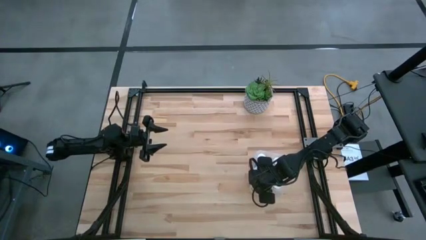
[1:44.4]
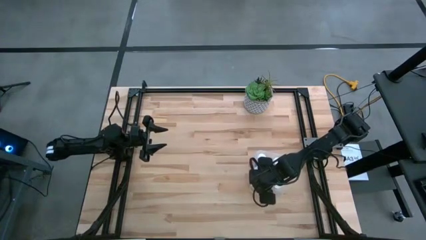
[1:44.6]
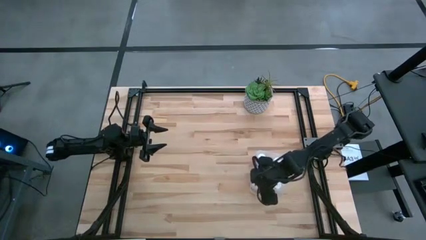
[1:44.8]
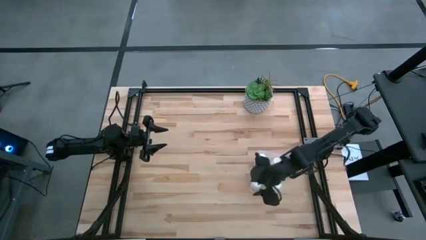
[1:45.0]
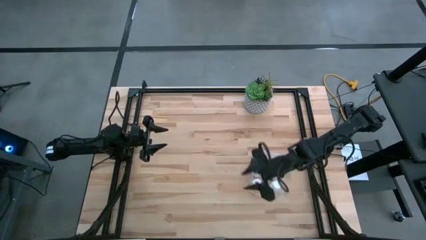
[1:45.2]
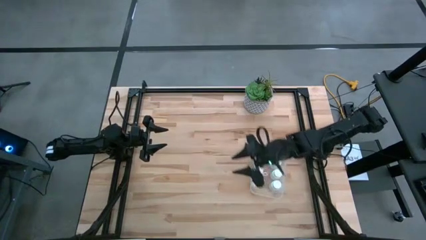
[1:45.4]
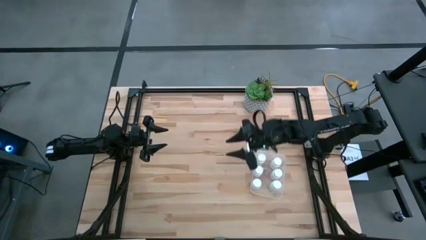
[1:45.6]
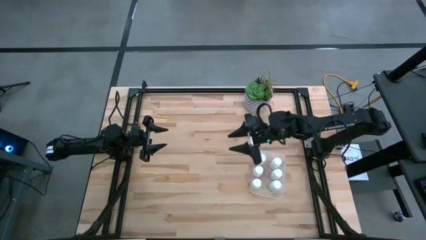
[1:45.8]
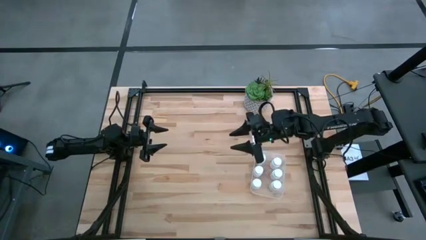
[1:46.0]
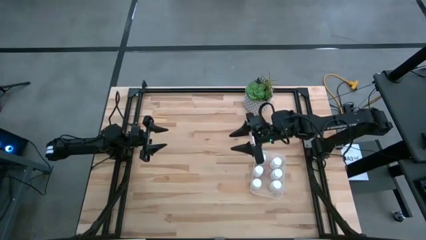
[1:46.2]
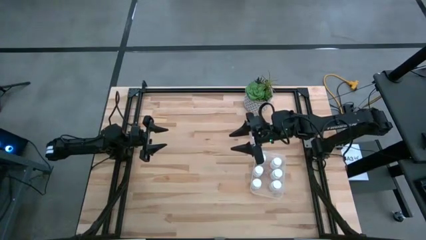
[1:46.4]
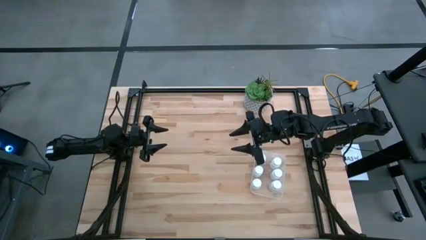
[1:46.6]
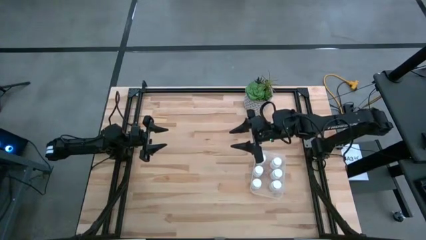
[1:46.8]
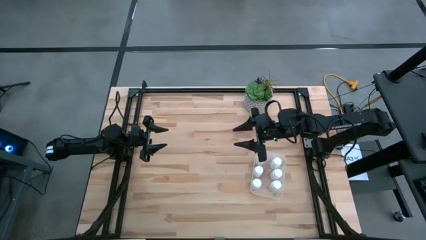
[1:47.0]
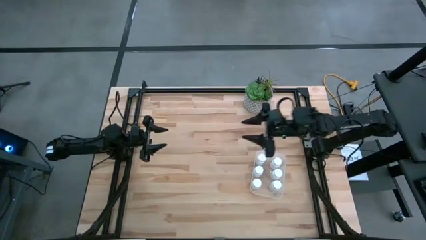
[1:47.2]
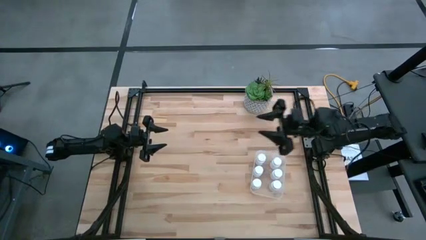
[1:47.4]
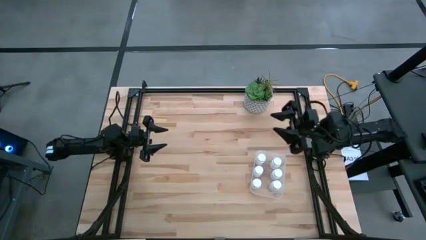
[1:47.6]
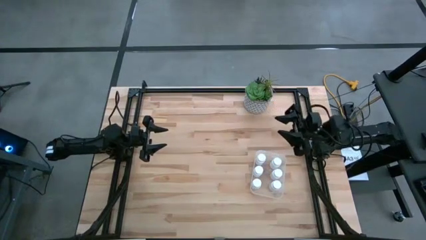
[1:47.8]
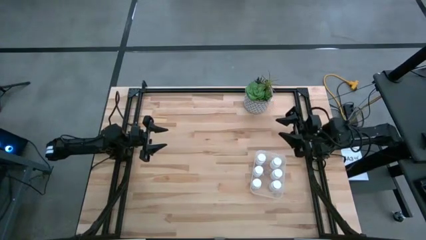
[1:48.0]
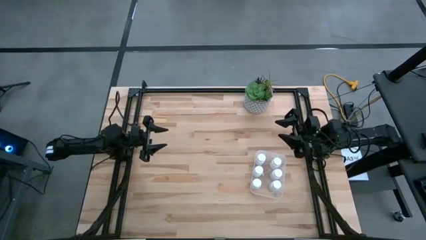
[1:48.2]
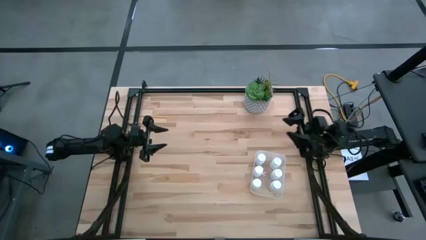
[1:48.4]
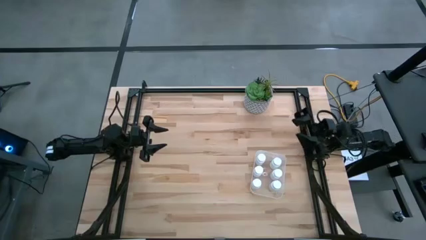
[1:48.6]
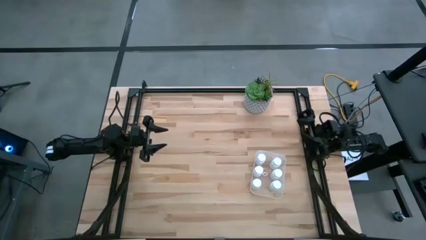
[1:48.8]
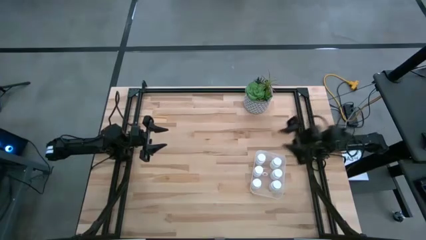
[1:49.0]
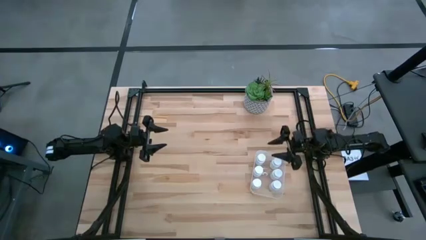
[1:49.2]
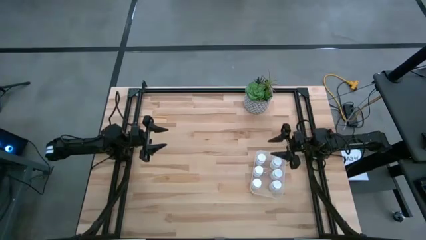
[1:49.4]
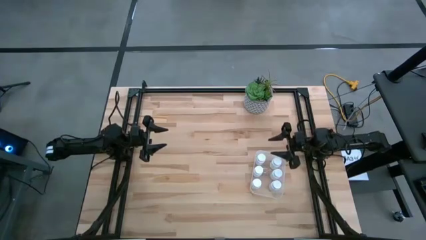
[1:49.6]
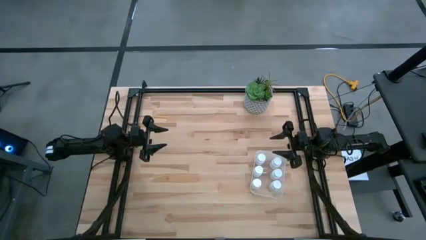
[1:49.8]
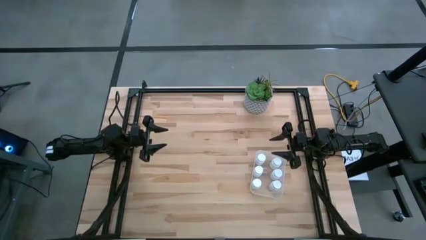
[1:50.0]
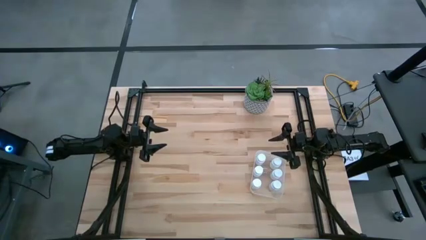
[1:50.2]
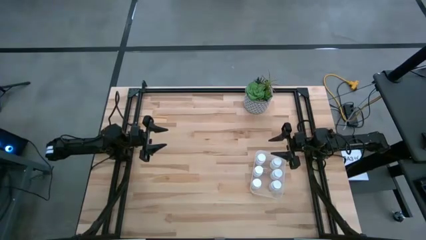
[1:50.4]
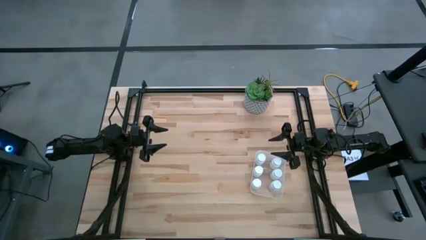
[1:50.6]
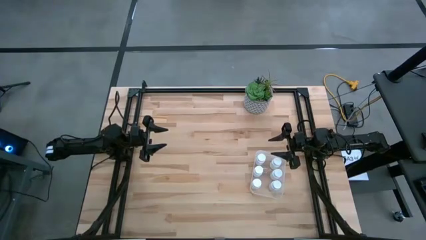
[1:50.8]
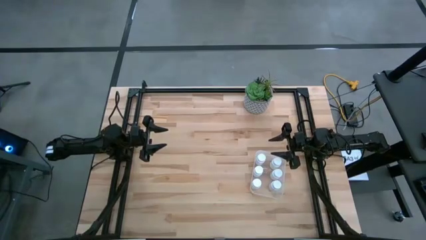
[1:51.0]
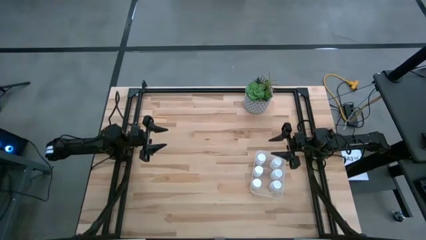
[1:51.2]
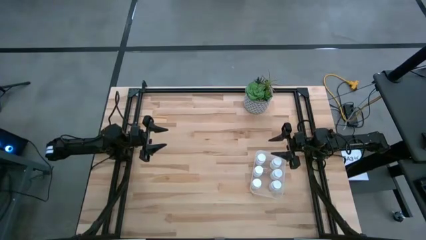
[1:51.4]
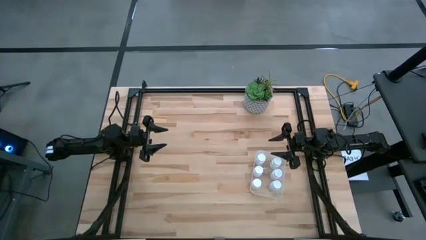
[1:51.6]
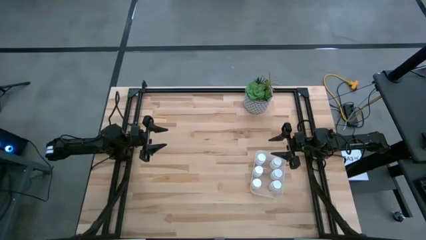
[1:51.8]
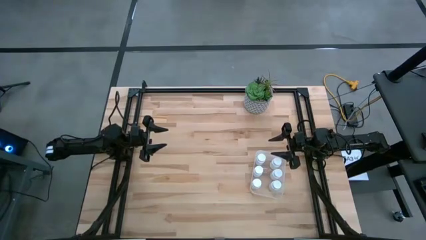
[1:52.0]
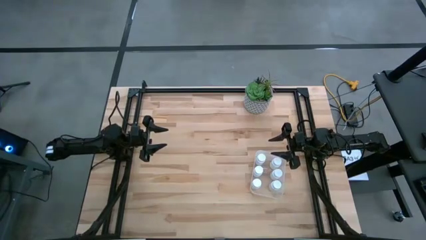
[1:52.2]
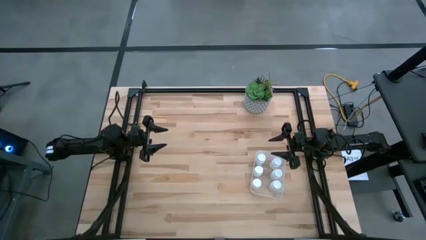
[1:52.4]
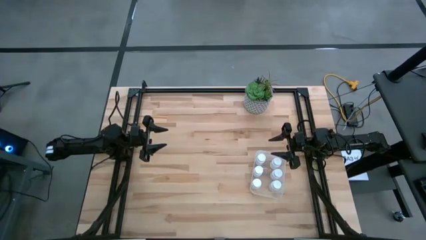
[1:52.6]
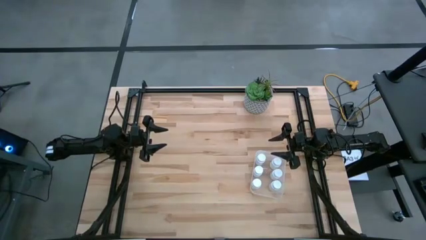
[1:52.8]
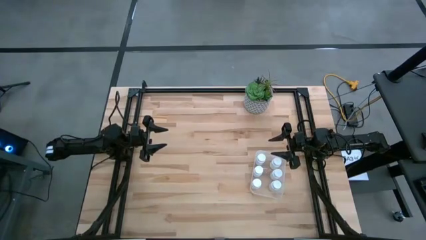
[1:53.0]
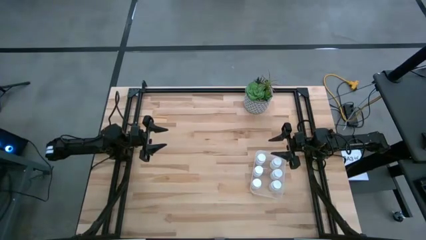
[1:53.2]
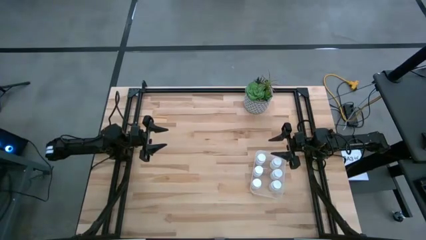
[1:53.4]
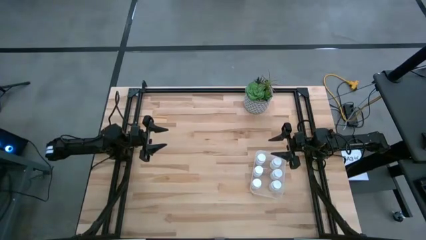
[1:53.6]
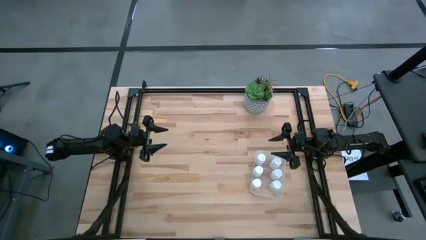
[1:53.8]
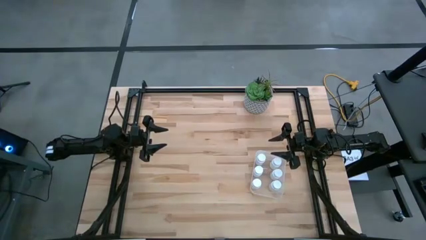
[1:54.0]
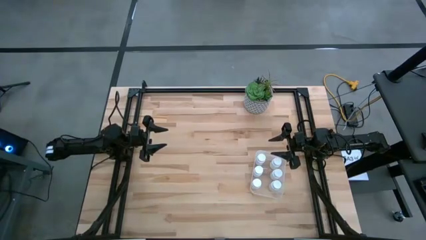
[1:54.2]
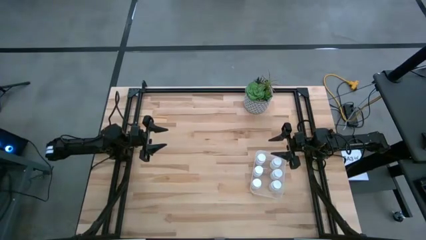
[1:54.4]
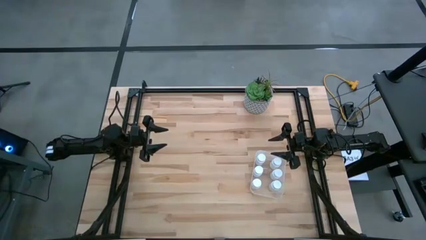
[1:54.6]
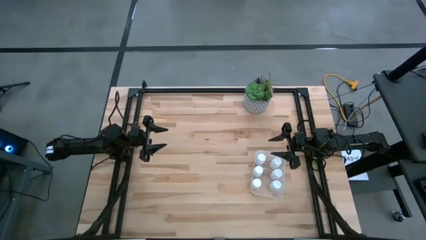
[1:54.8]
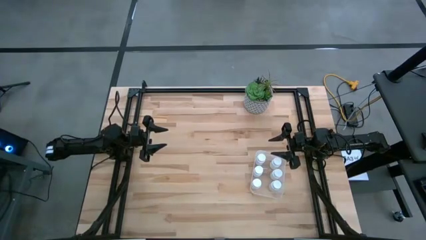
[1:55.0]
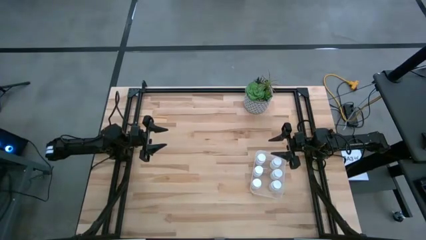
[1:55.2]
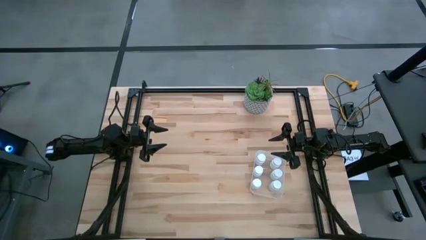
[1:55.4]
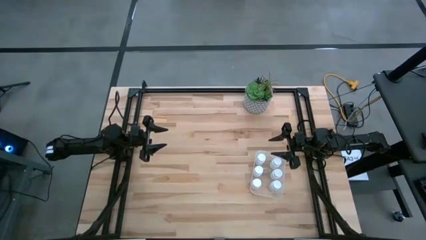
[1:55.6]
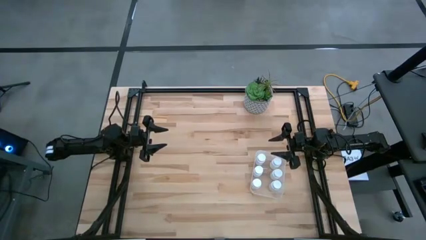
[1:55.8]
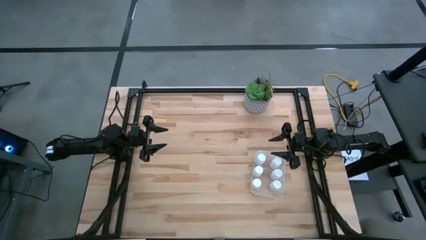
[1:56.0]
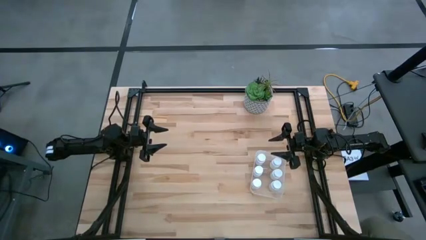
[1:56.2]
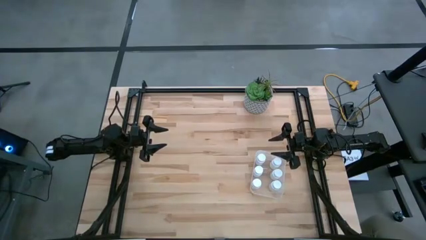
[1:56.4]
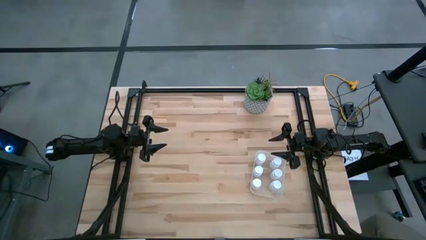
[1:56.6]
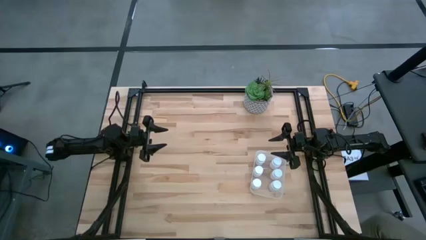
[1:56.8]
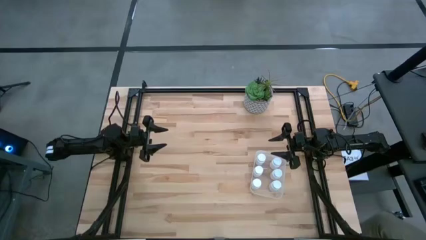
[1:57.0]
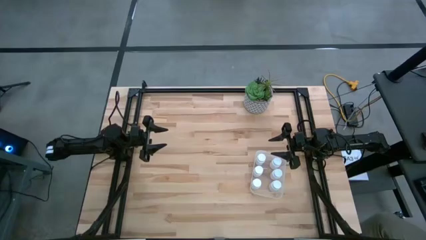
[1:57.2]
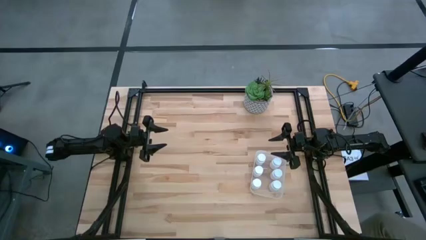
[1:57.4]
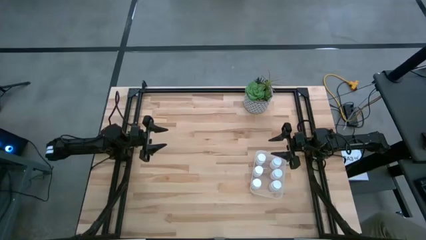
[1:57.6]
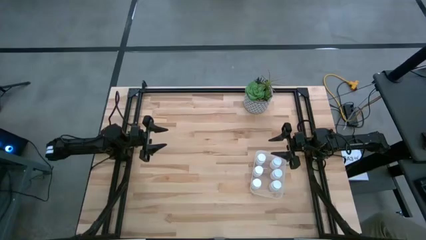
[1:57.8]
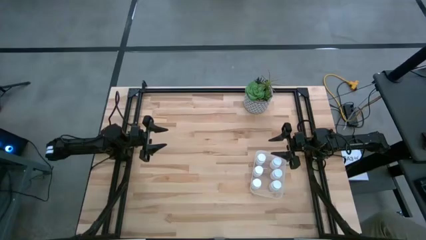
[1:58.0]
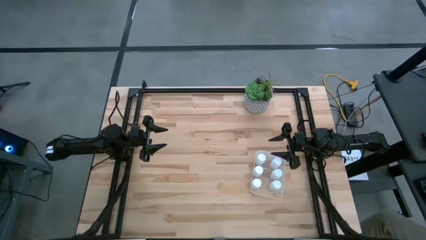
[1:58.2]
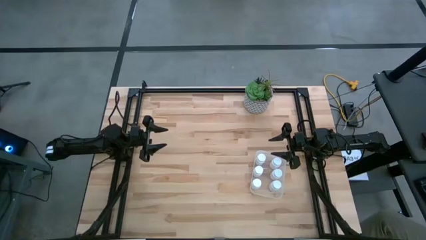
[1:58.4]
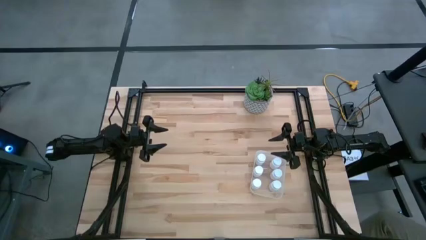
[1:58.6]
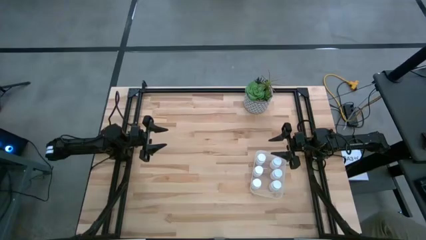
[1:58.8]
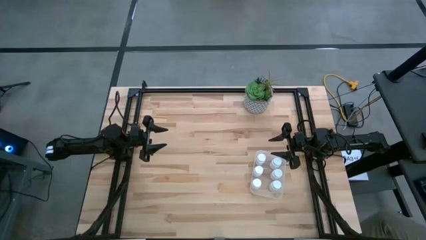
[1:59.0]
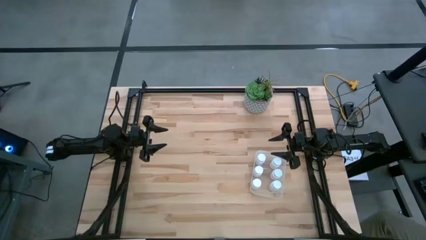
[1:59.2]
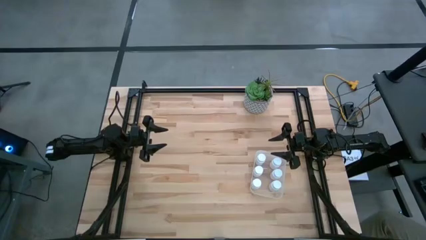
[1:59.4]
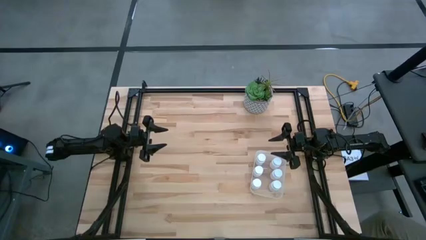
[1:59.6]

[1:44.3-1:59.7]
Task: Pick and place pill bottles into a basket
Return to Home Position
